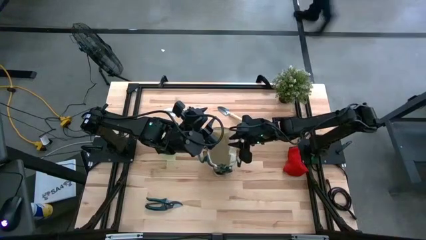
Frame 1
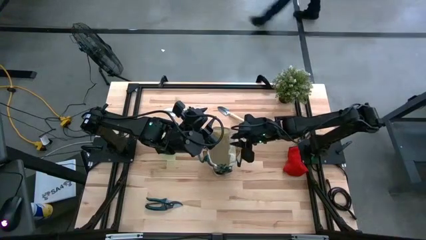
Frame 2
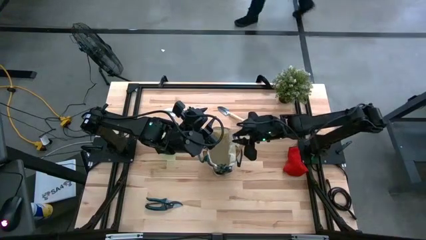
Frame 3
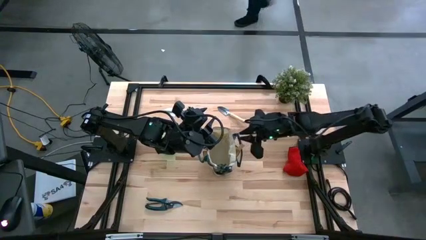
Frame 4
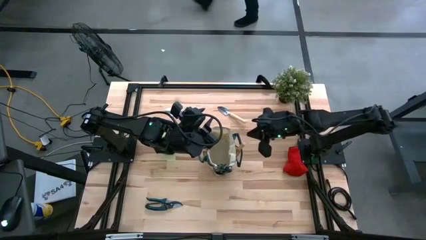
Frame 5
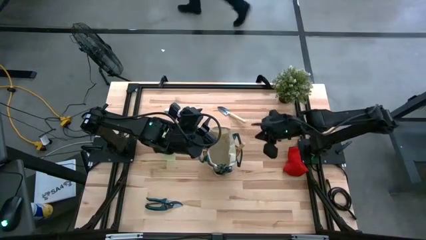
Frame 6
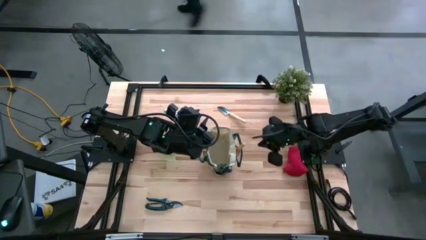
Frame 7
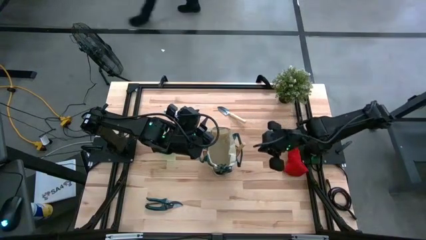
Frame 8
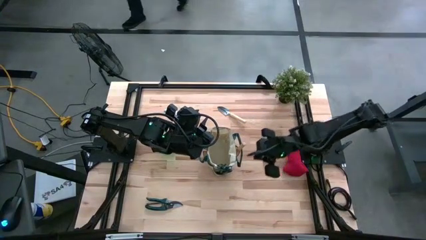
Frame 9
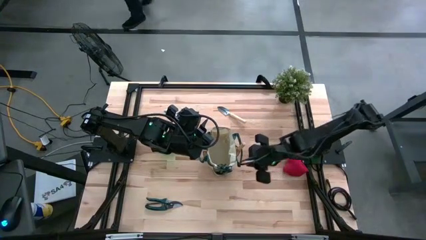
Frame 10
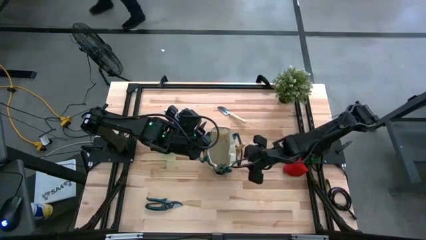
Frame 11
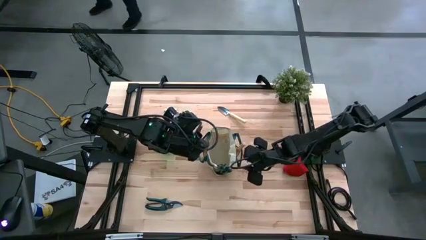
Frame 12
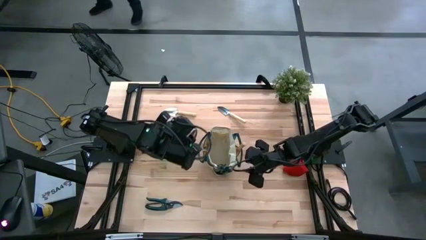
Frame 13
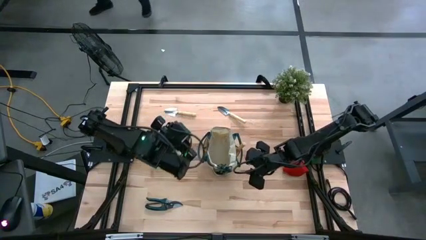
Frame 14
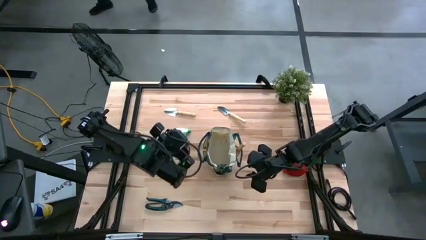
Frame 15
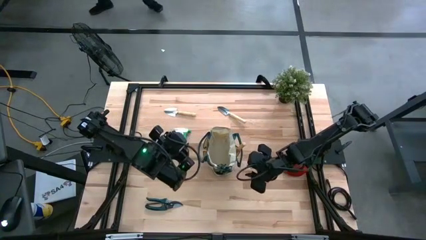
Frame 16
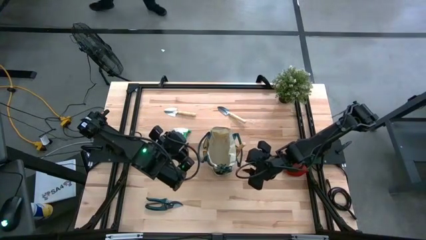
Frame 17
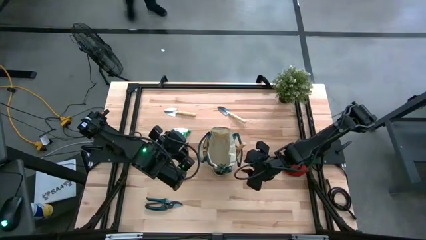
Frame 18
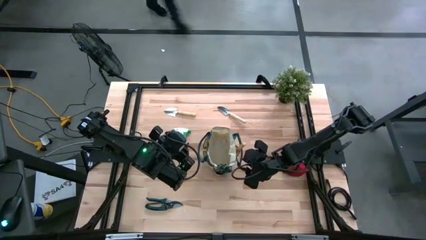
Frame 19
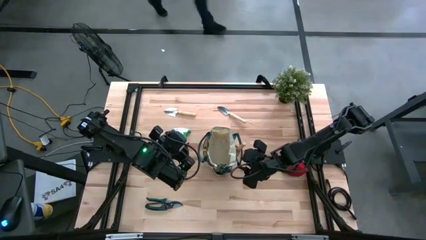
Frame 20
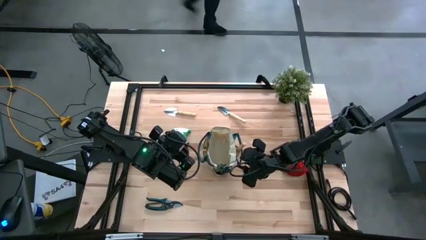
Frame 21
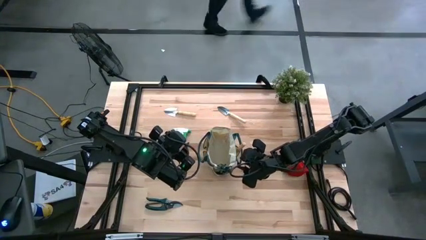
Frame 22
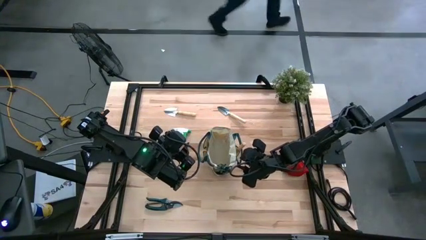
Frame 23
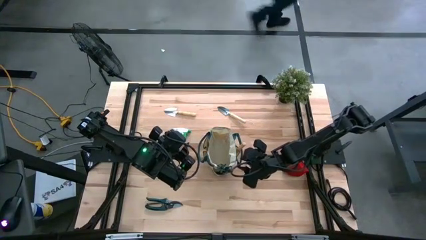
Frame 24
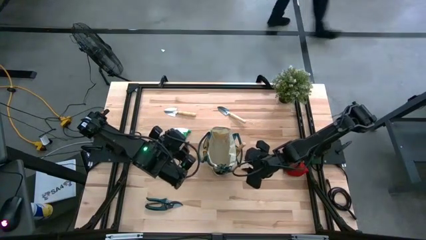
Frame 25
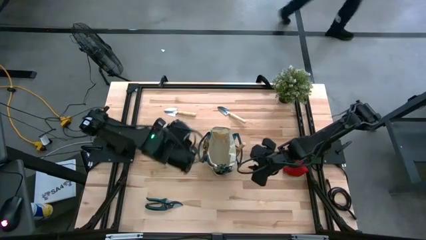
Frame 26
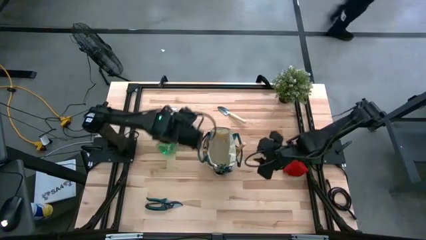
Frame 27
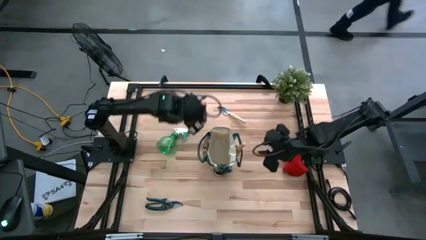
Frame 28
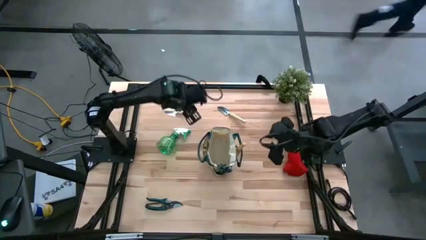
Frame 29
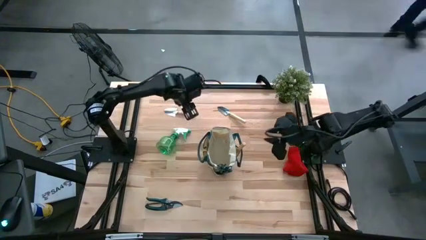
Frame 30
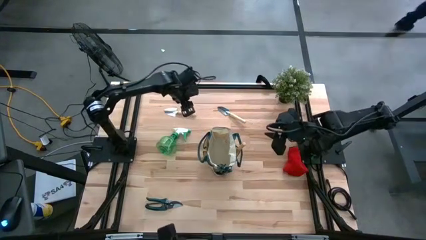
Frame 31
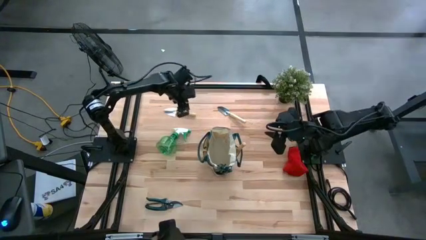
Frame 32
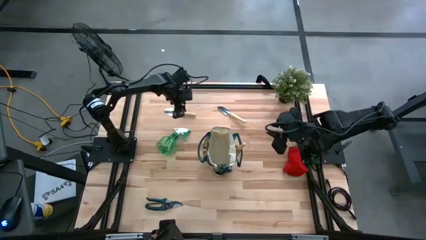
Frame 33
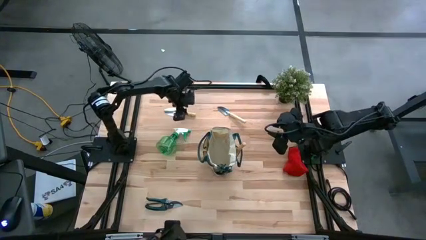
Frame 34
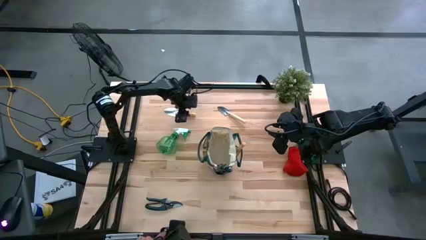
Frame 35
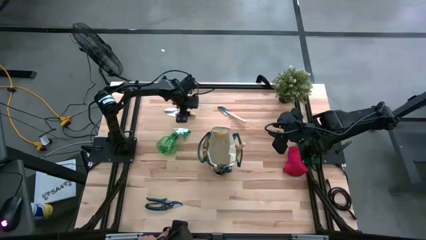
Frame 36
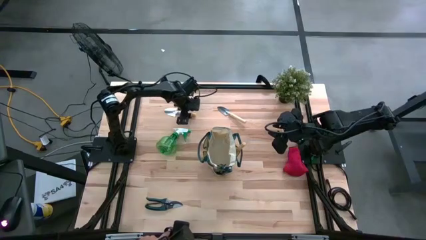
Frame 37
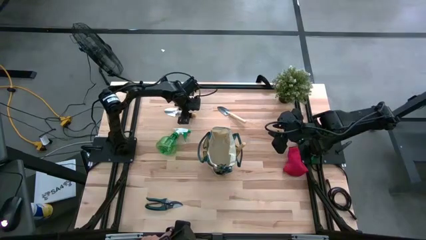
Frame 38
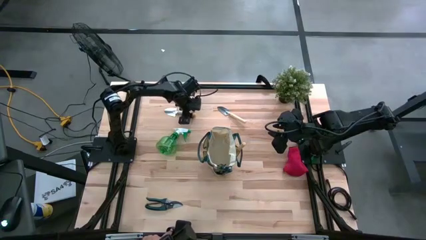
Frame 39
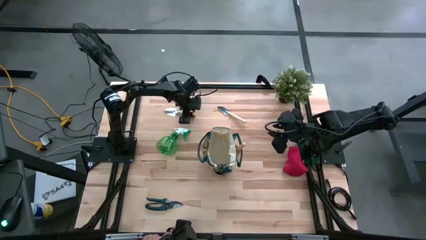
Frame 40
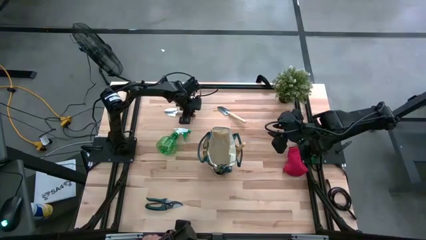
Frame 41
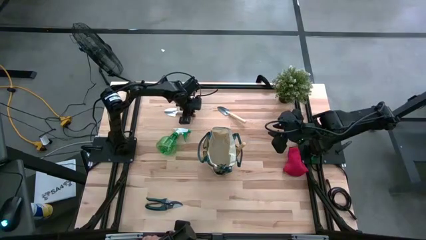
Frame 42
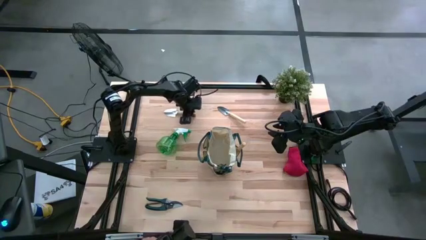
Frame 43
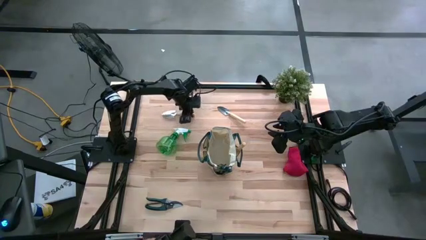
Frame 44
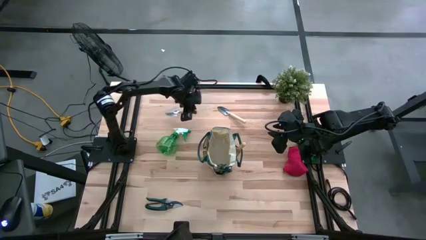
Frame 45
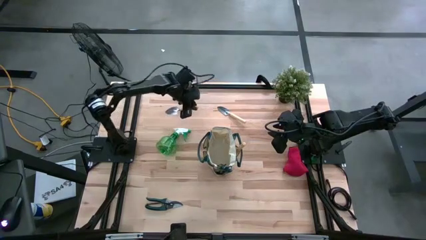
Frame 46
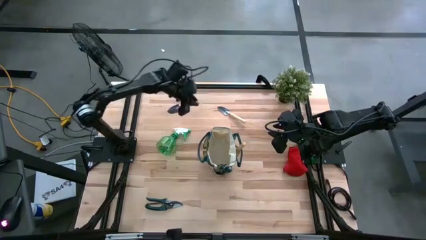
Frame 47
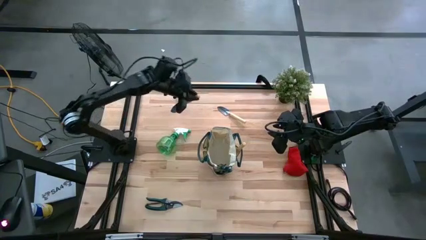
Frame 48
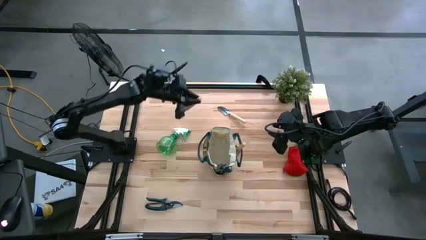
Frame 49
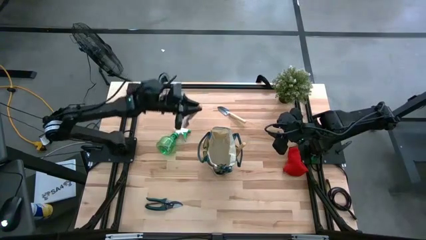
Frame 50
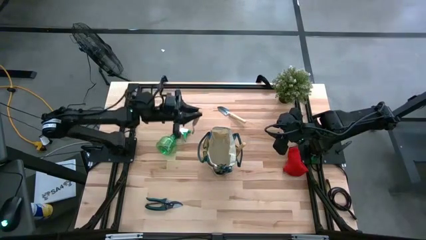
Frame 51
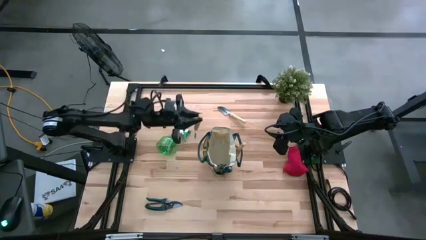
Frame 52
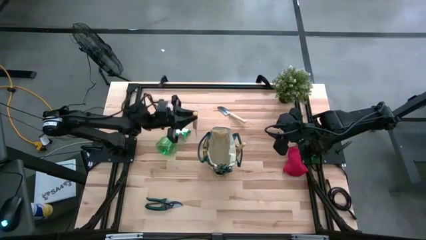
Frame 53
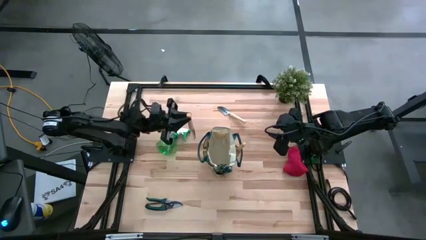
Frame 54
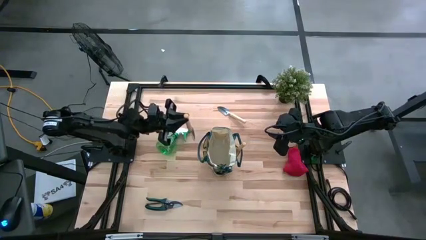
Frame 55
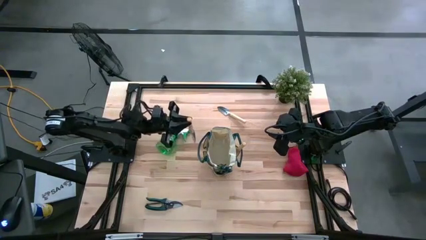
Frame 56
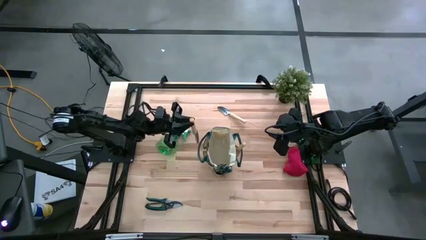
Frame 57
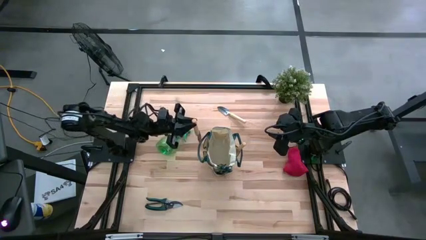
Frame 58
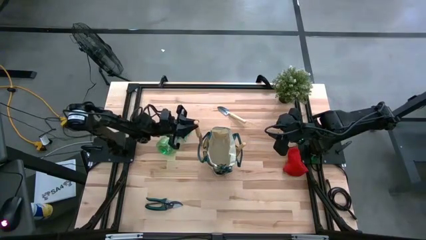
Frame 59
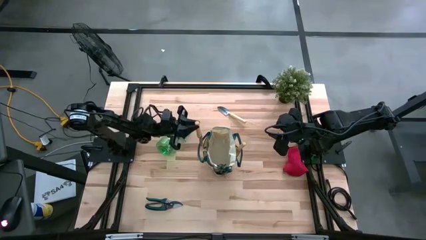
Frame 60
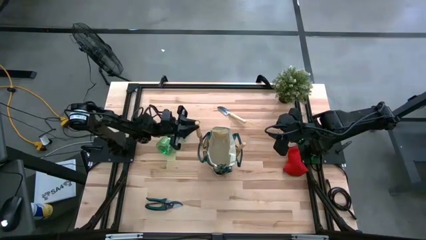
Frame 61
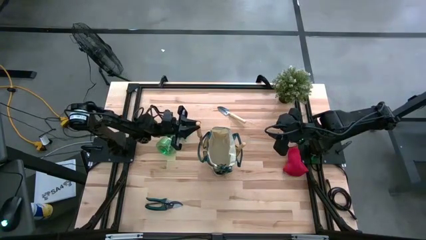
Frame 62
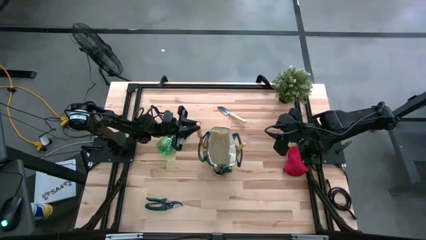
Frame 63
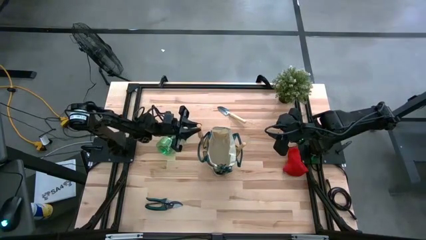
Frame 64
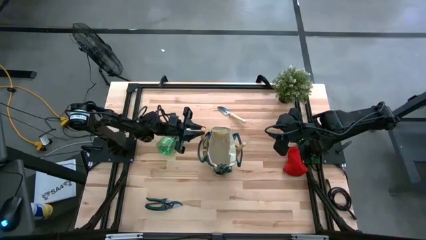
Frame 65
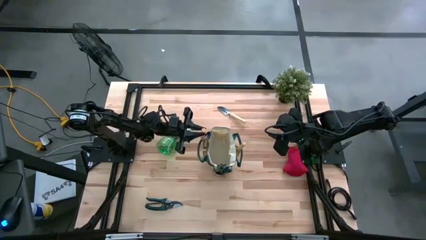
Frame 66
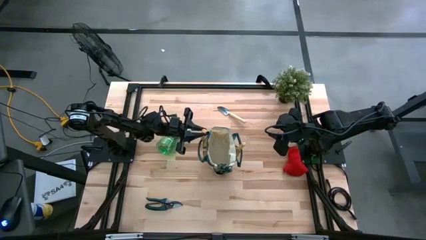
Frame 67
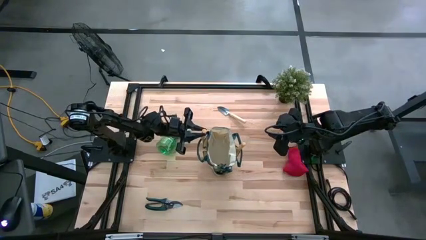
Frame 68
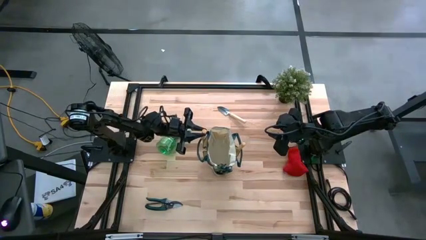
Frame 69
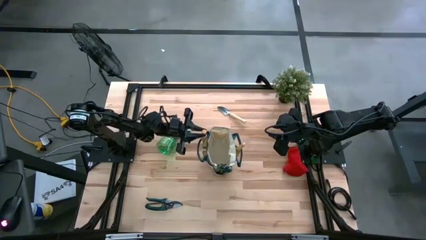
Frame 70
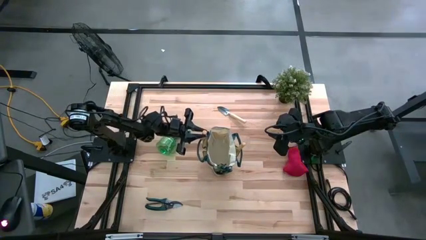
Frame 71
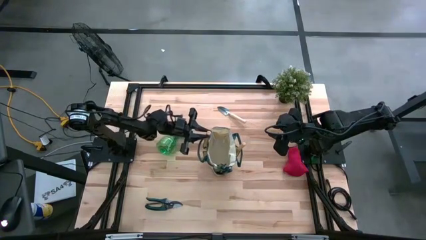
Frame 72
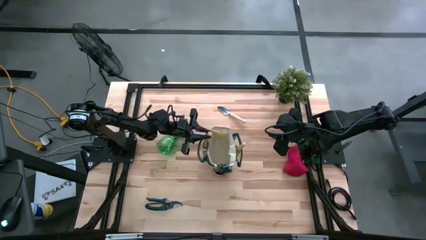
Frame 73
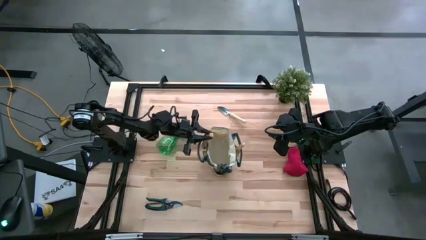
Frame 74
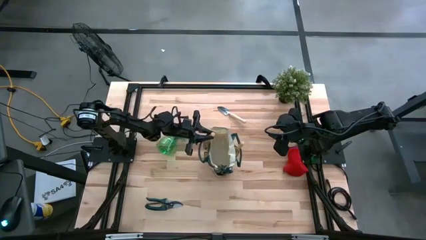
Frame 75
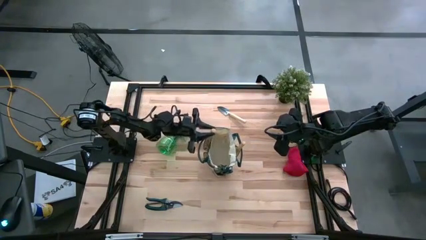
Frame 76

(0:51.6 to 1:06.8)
Task: Pick & Place Garden tools in Gardening bag
Put the brown trowel into the white gardening bag
